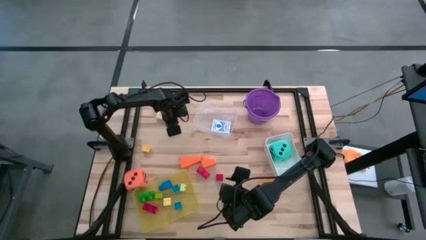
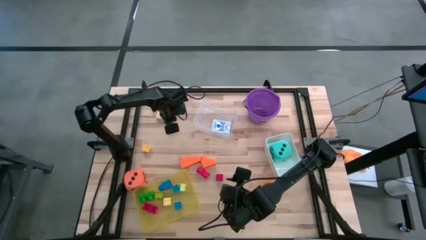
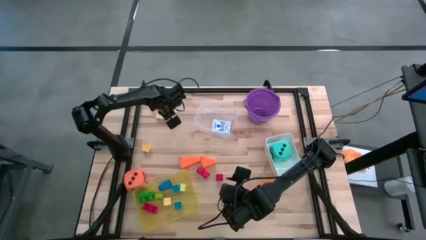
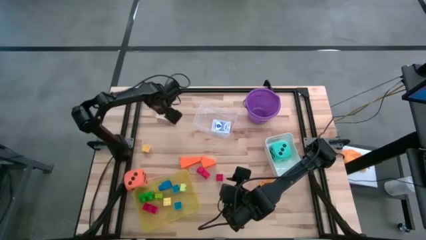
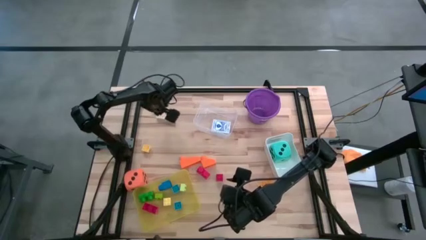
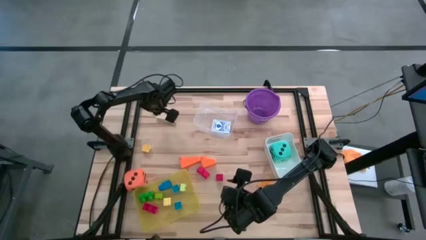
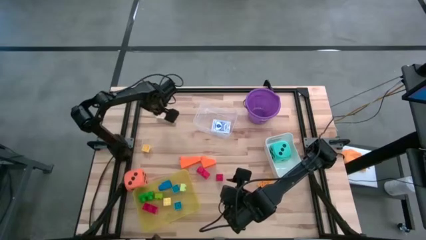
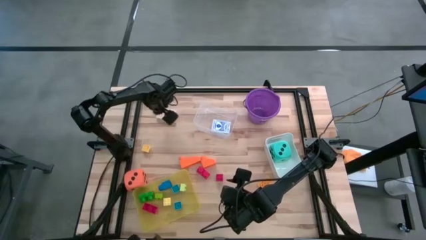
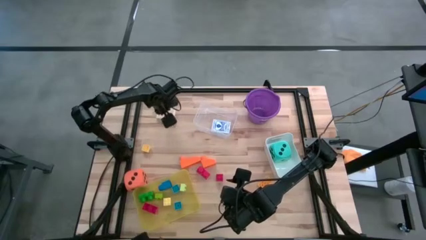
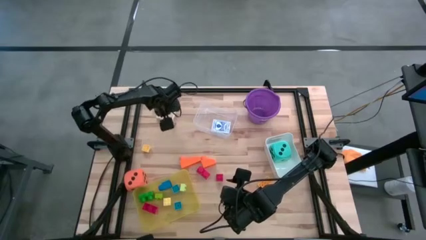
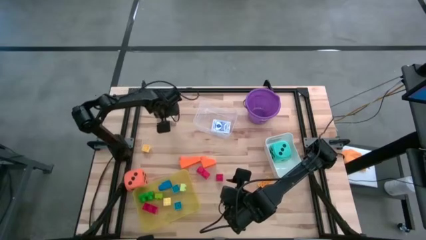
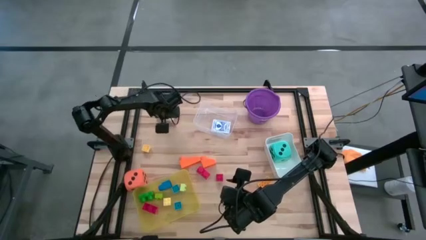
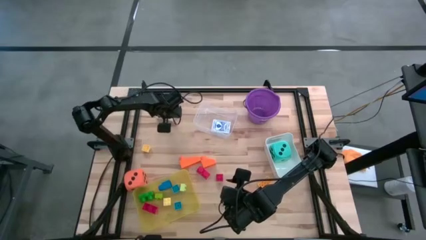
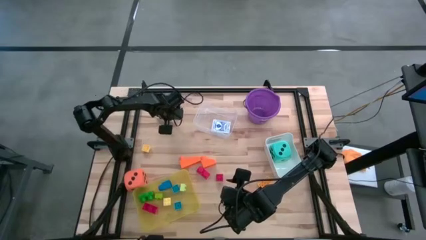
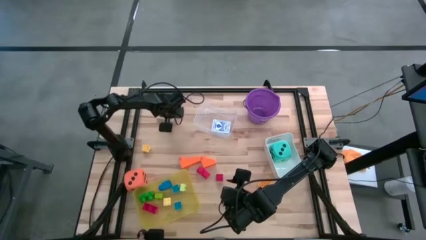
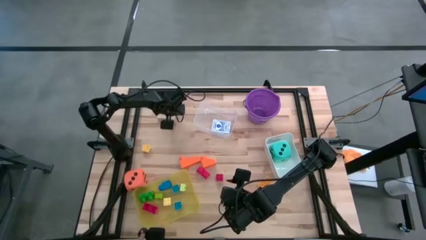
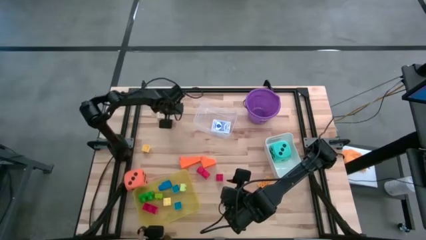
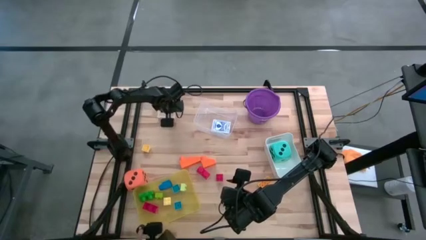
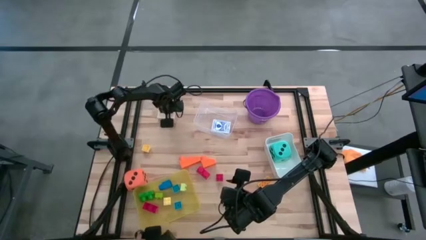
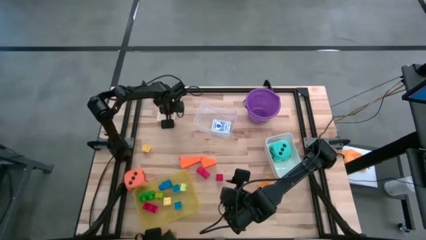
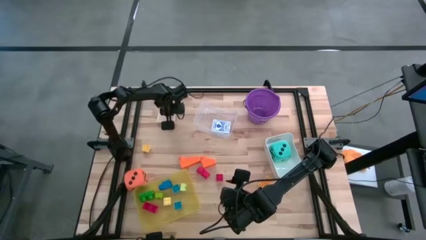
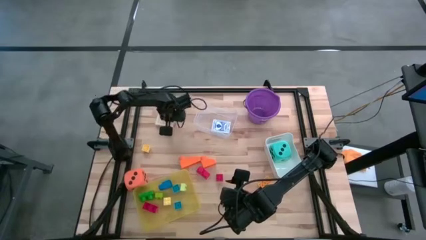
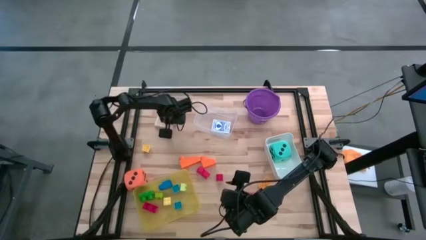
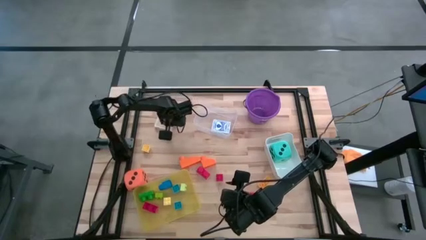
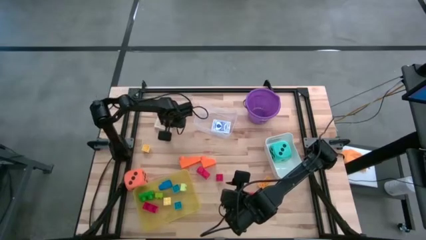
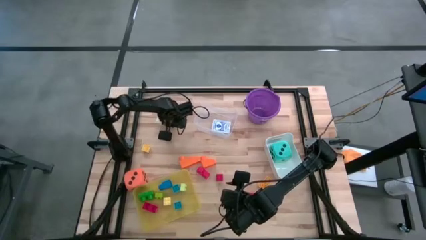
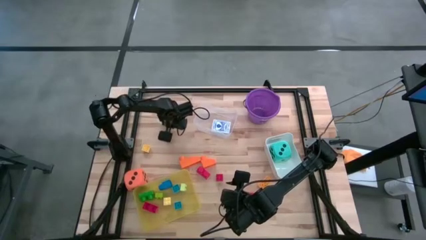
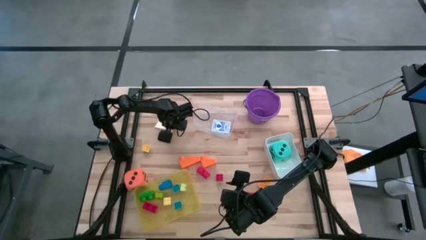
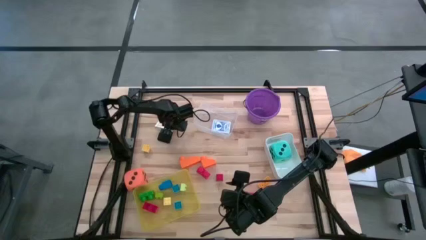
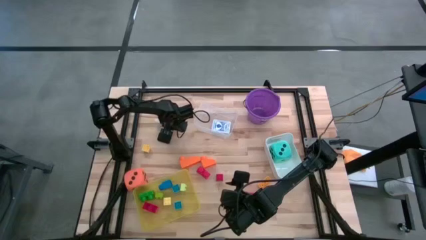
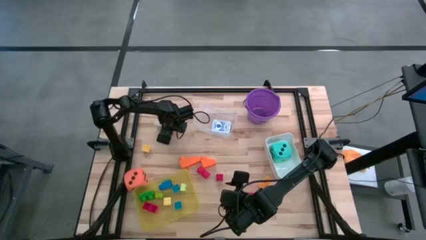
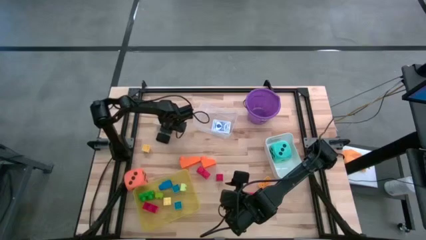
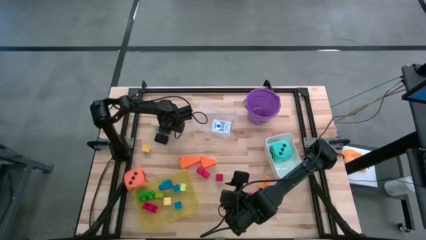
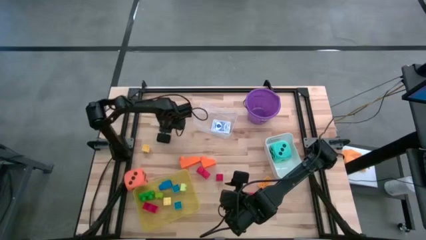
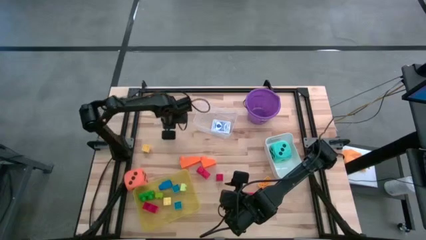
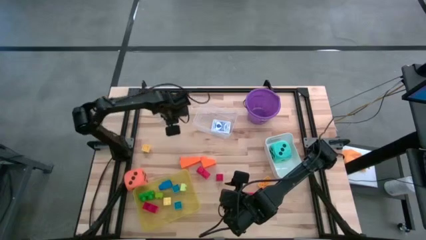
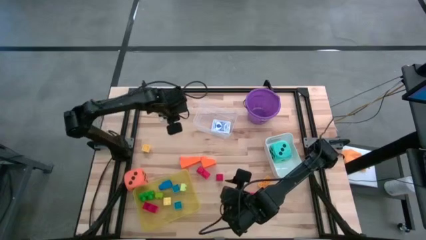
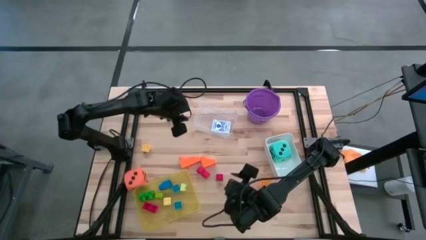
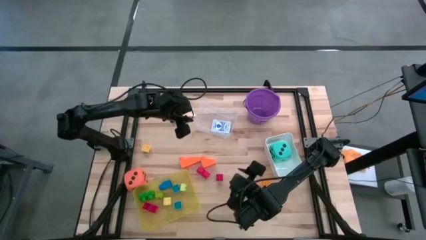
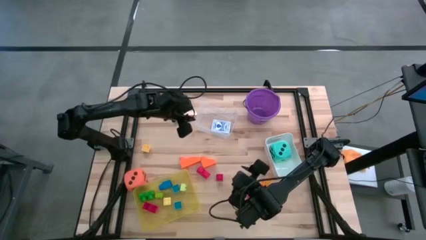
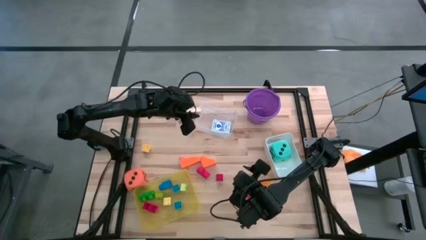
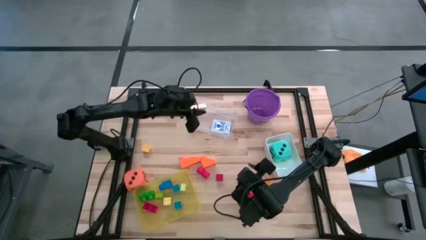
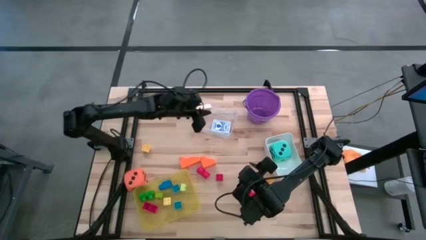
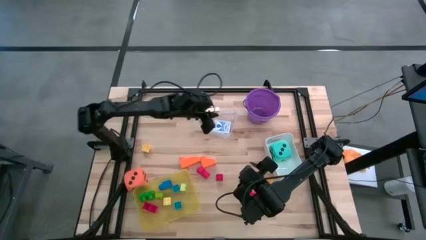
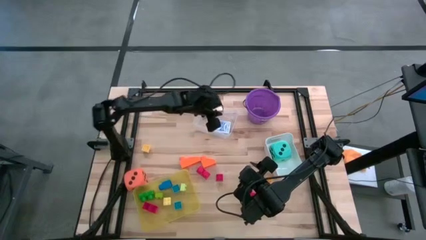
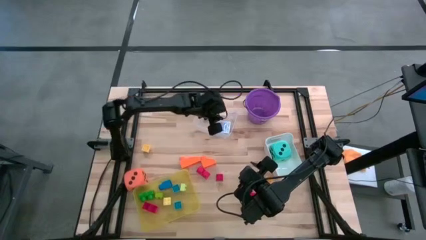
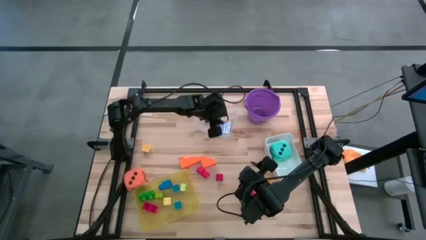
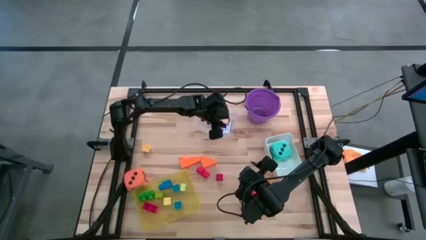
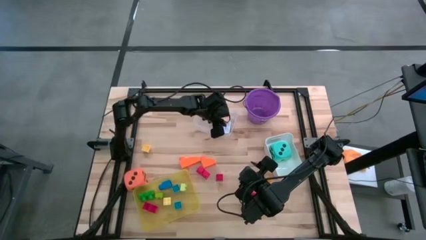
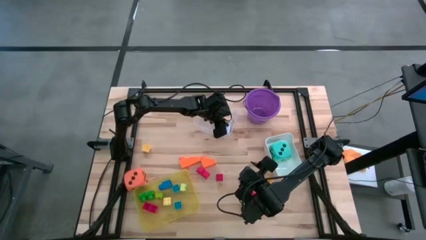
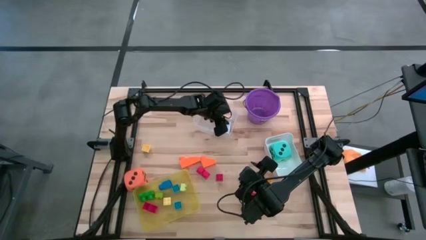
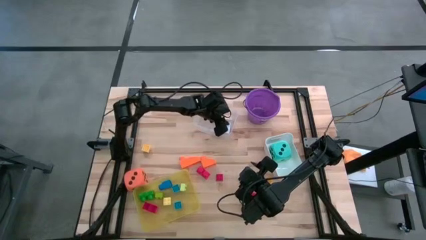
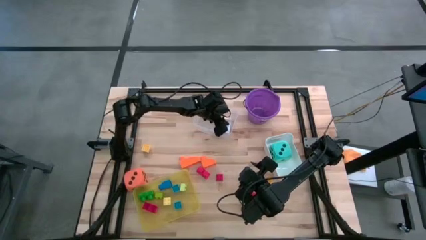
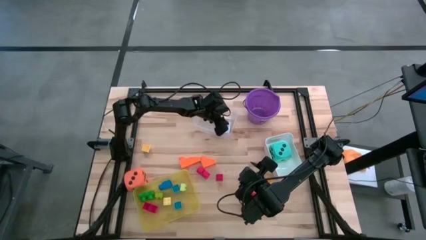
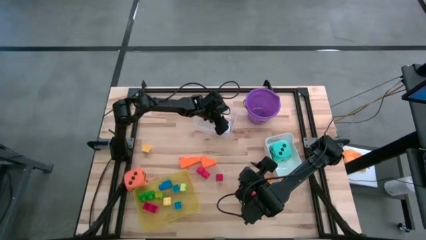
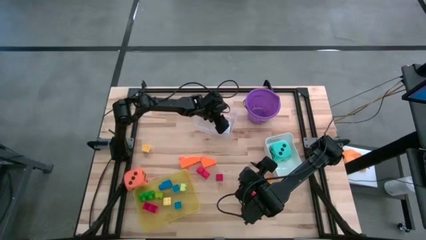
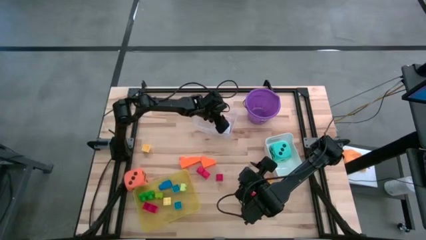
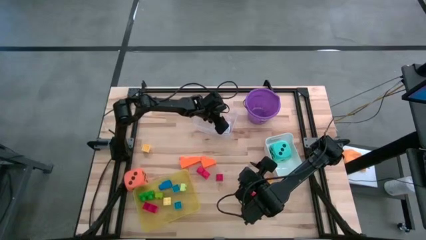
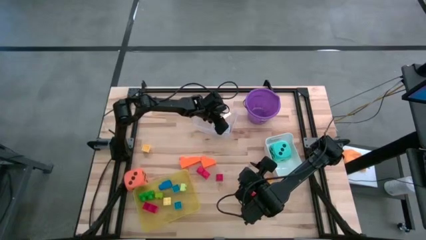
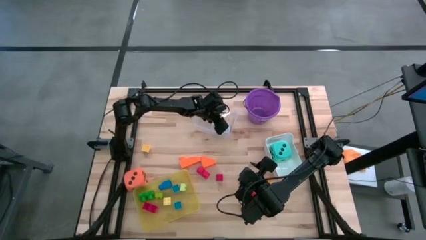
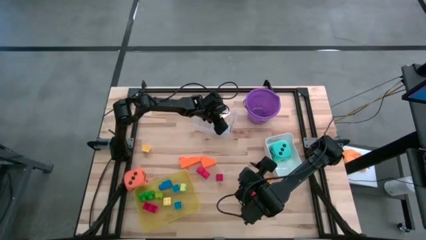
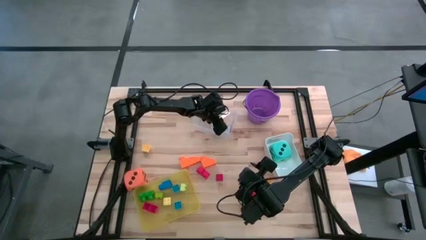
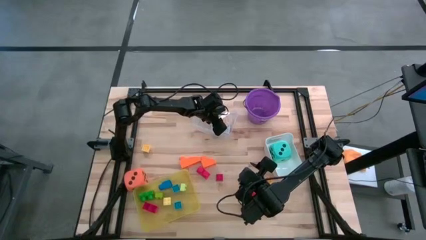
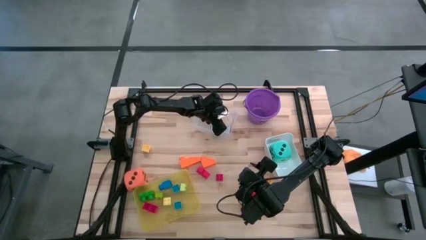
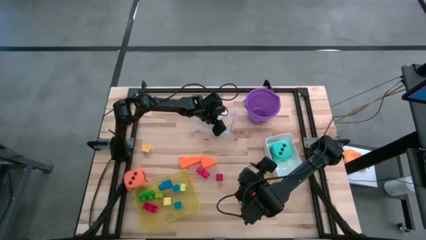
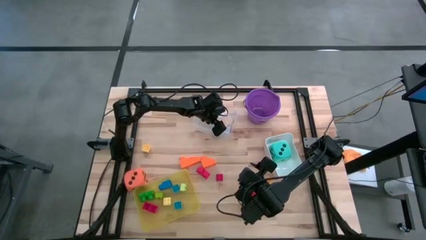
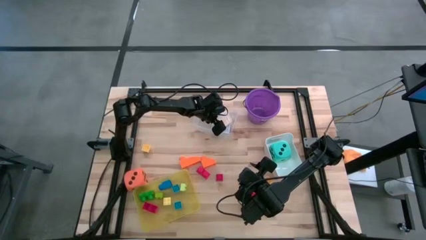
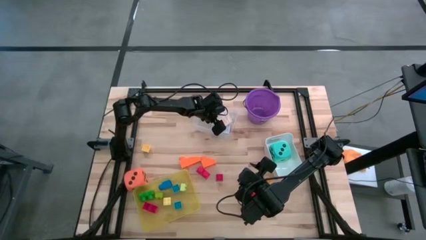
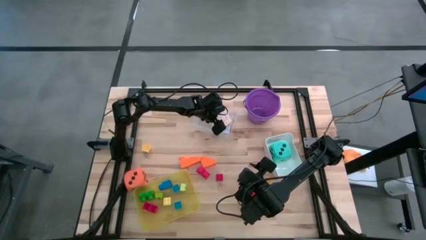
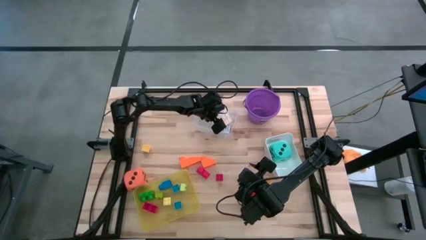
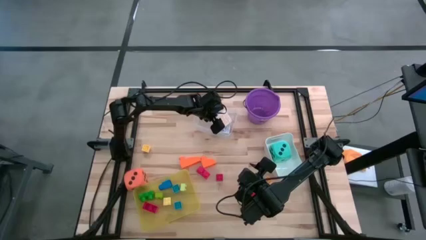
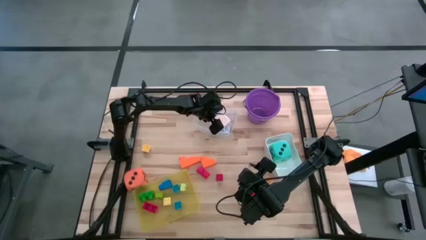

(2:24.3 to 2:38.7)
Task: Pick & Place Toys
Put the orange deck of cards into the transparent bin
